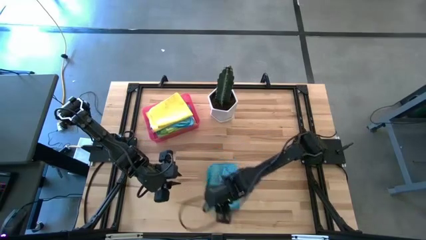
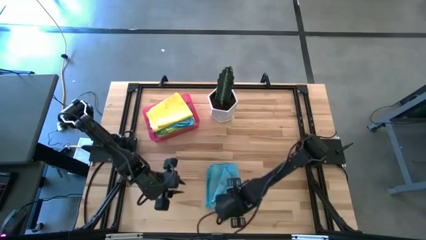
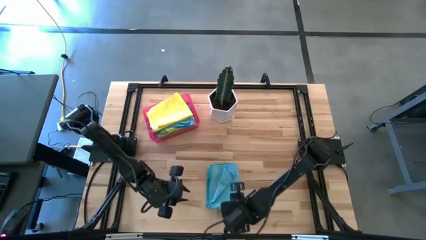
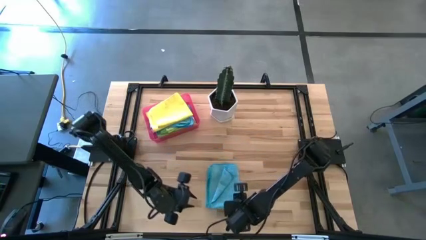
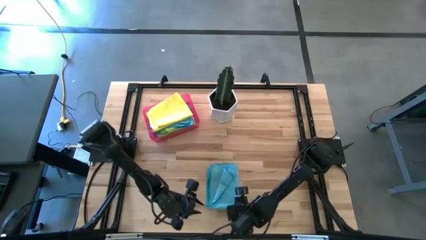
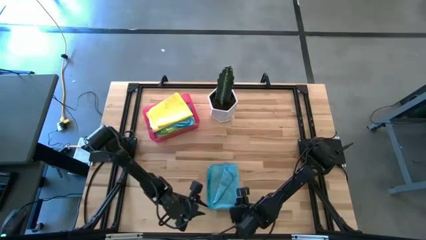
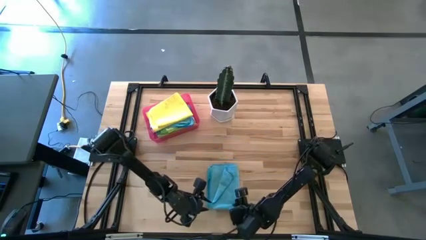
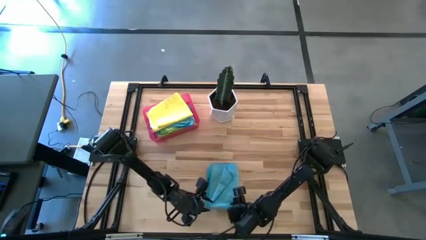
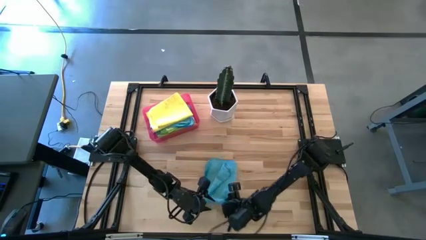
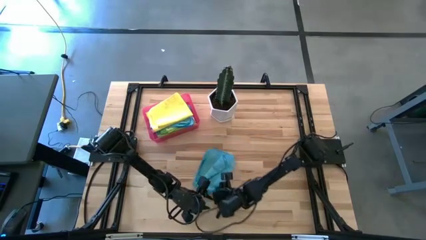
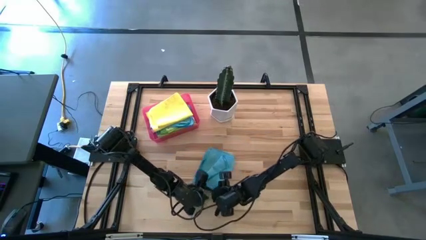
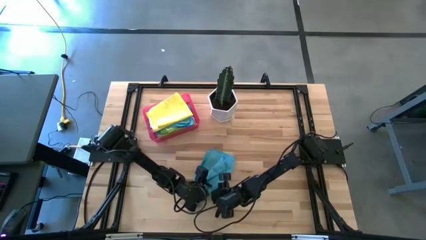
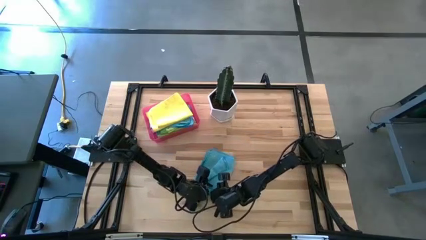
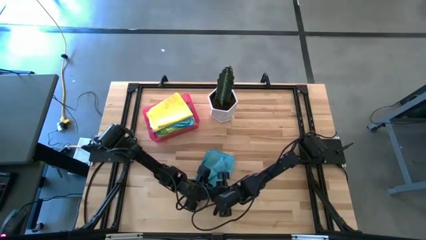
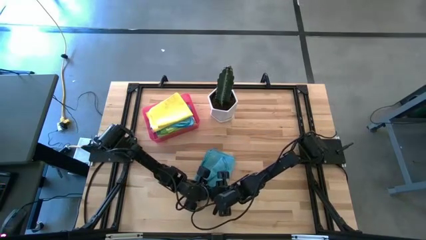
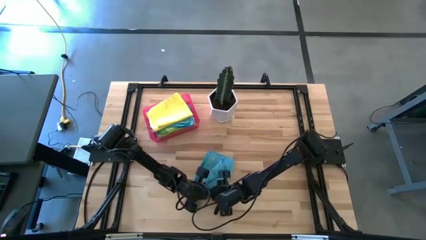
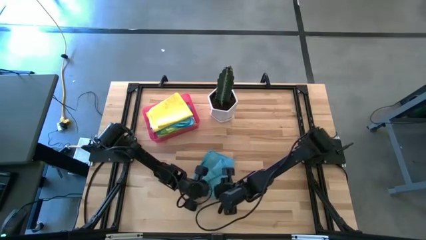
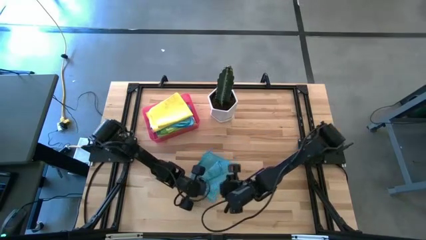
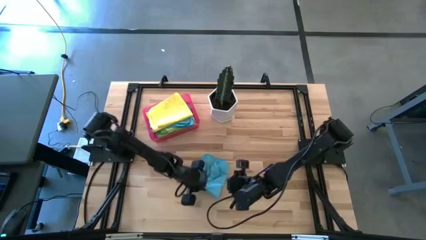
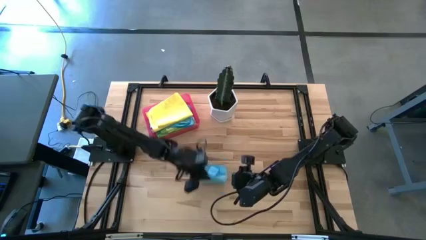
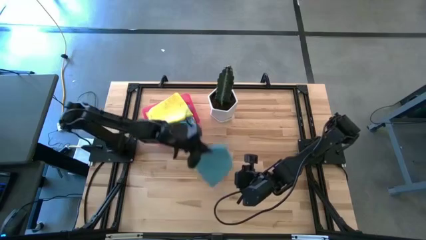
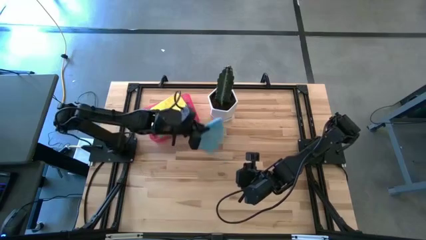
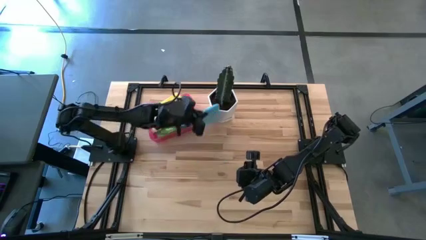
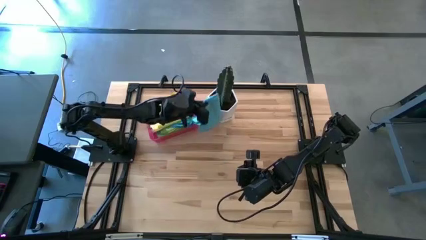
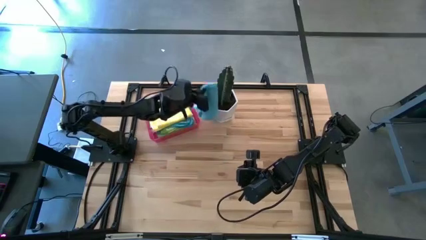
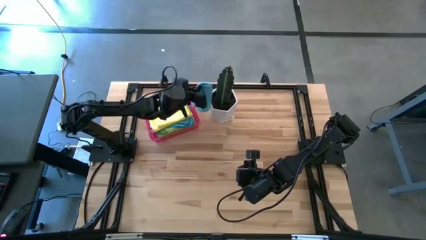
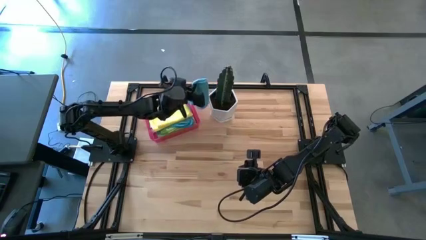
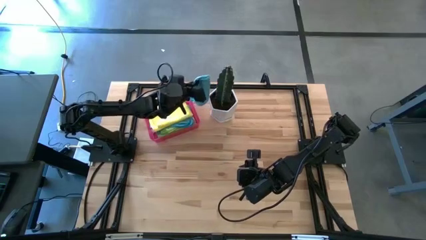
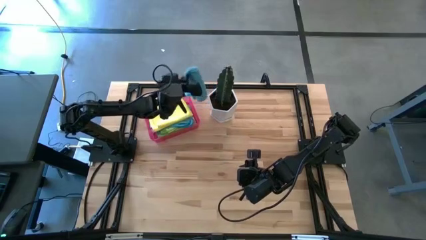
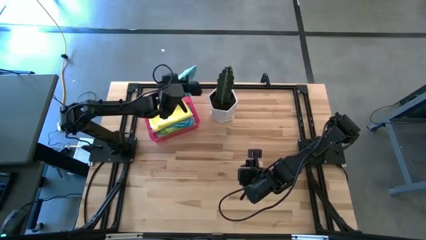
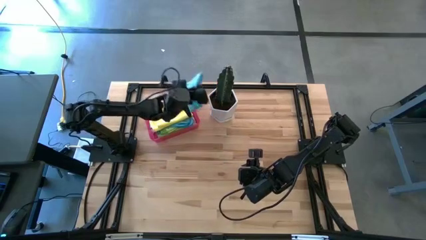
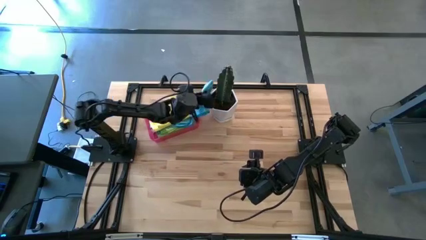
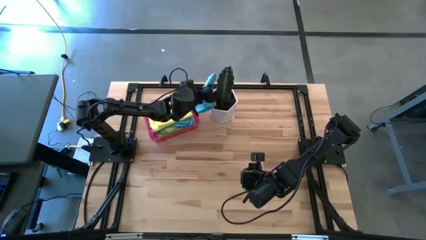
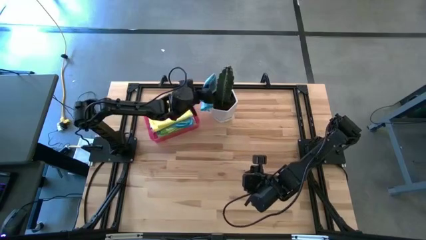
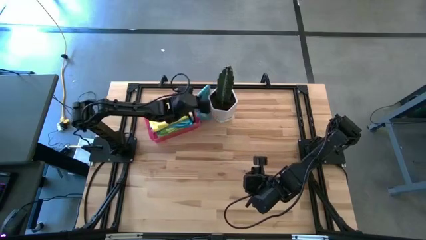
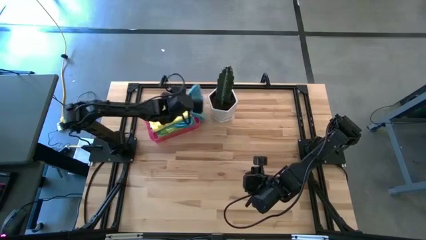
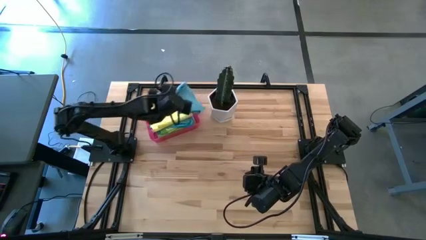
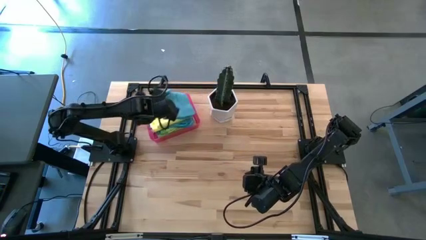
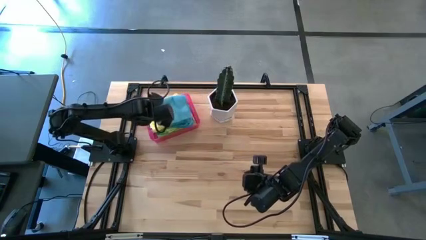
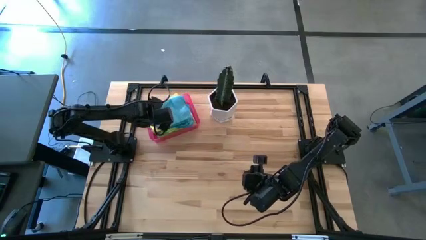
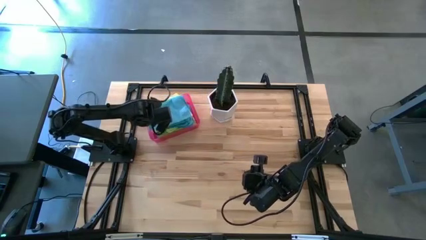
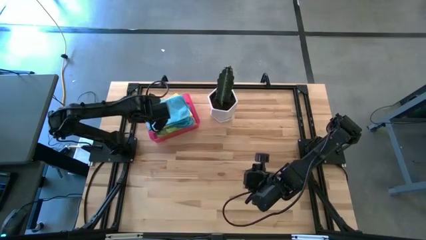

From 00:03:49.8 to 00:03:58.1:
Task: Fold microfiber towels
Put the folded blue microfiber cloth into the transparent pink bin

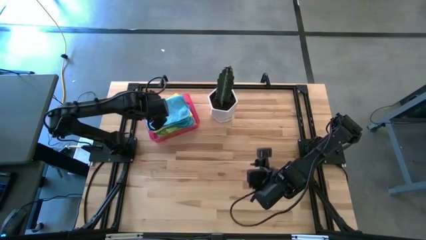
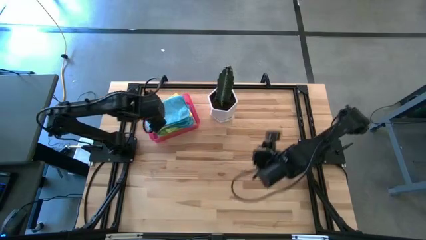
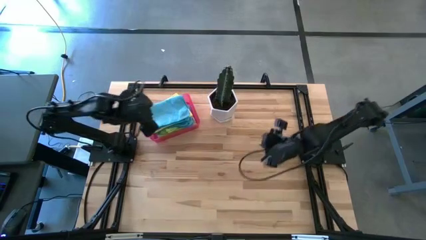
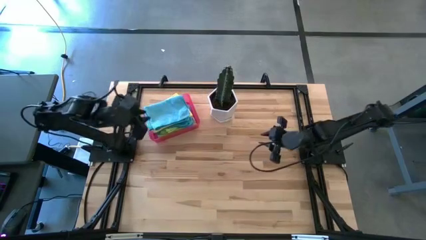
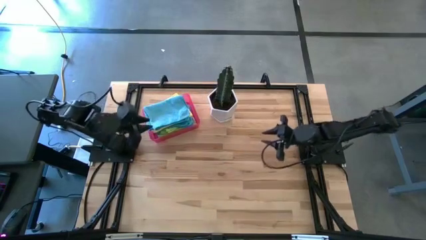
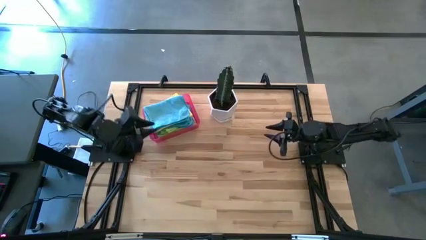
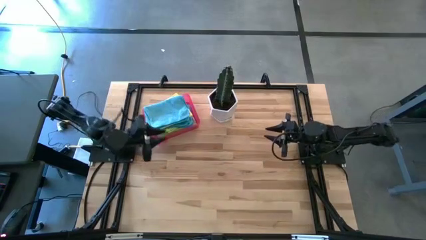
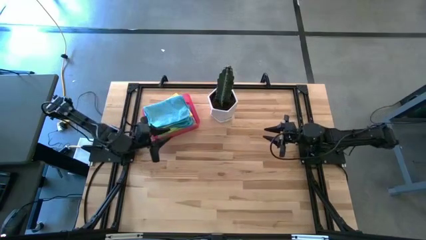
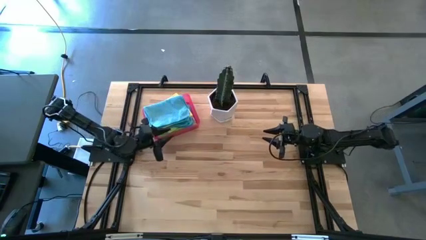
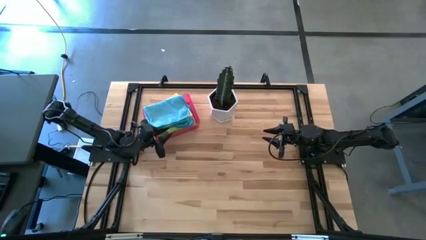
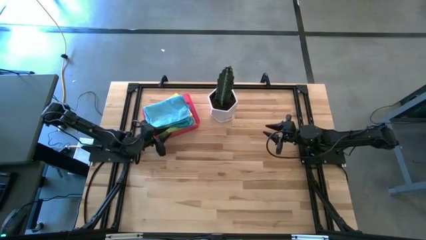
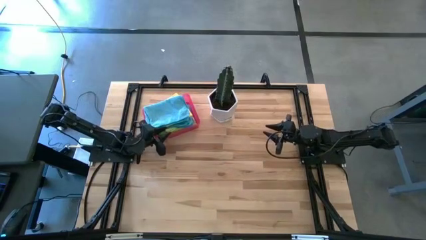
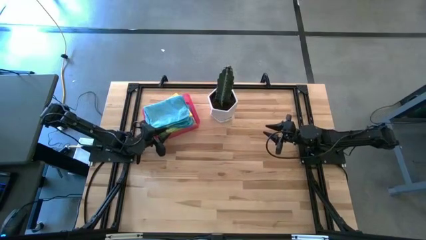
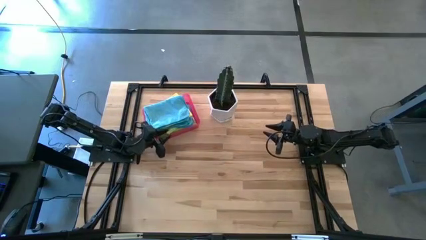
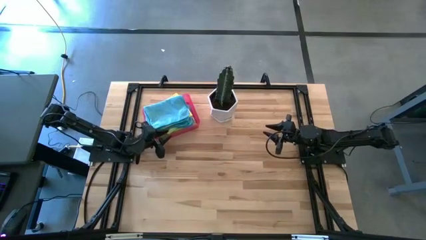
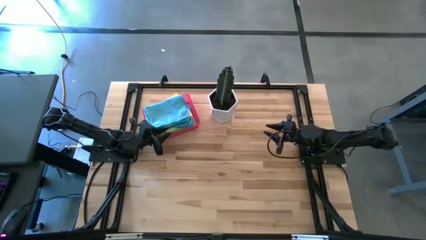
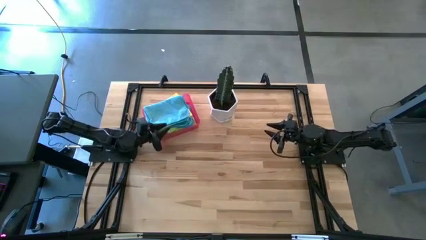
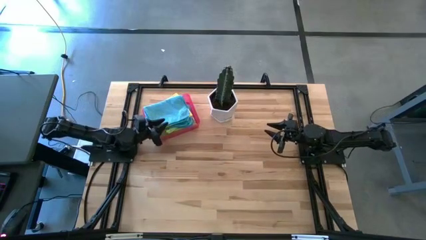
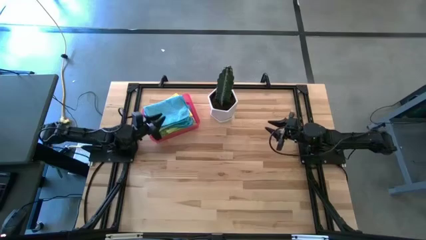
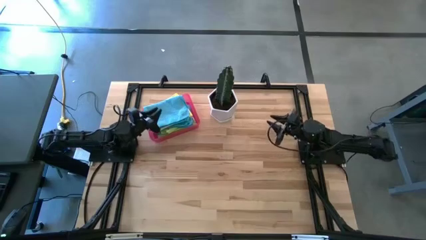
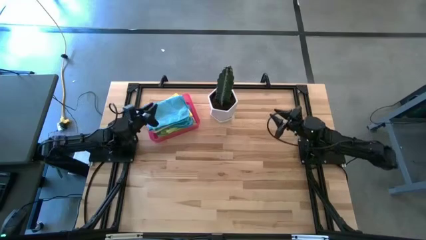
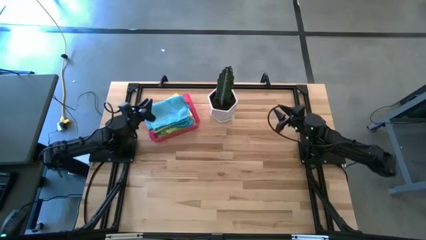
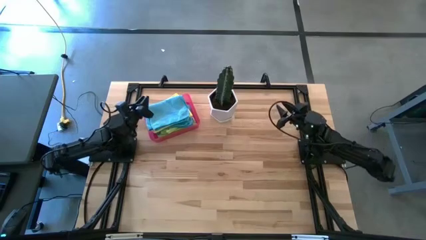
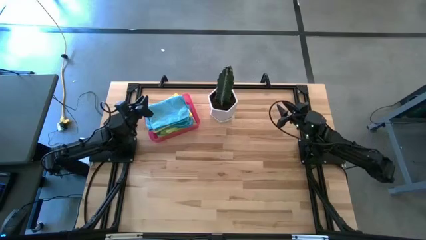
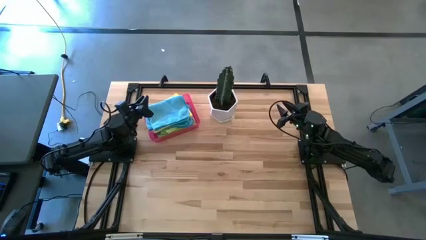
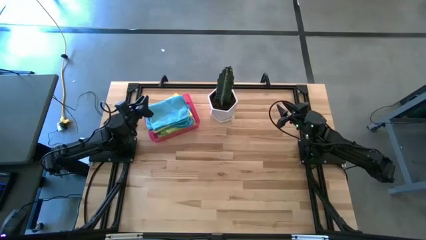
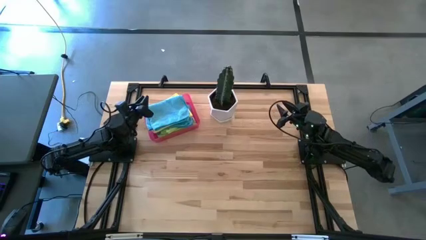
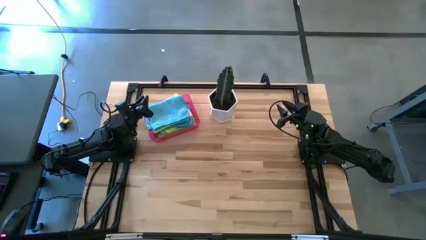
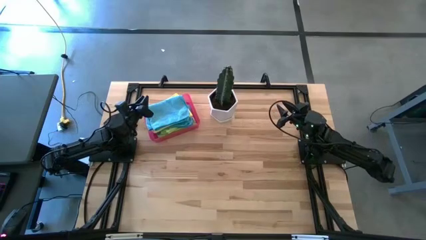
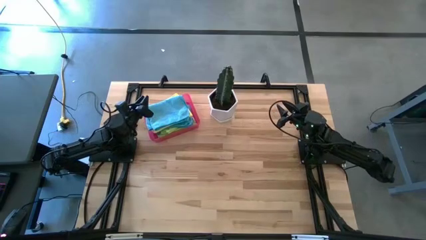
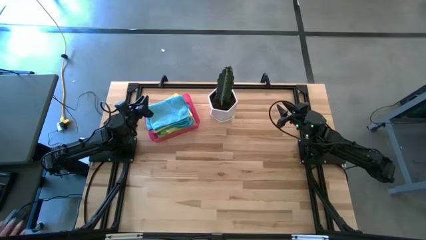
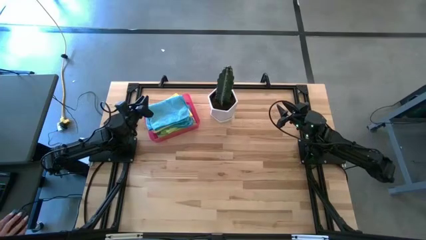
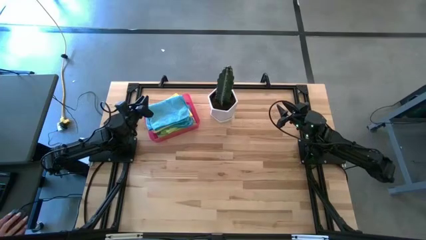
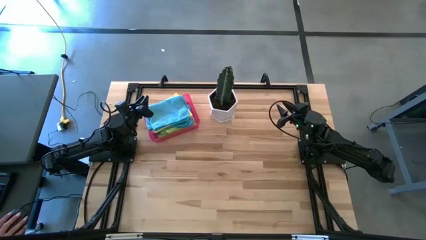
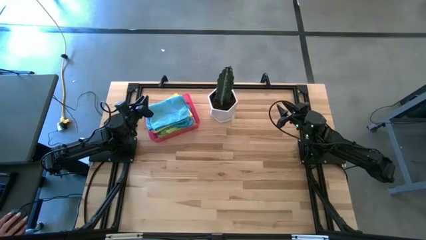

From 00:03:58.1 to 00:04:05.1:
Return to Home Position
